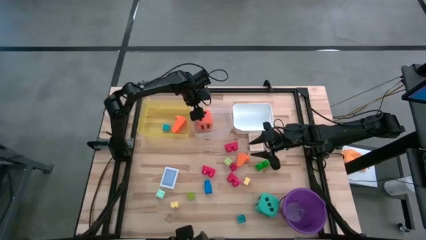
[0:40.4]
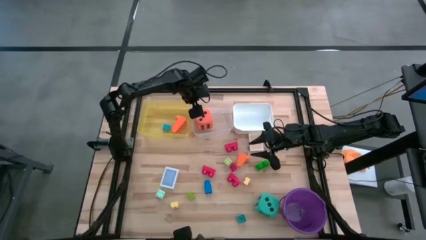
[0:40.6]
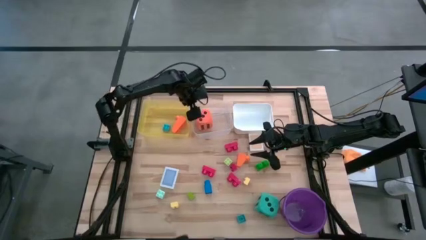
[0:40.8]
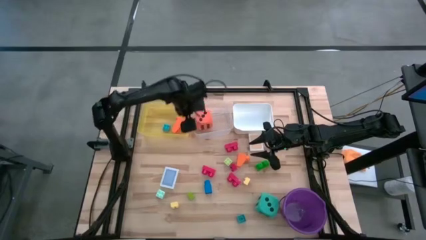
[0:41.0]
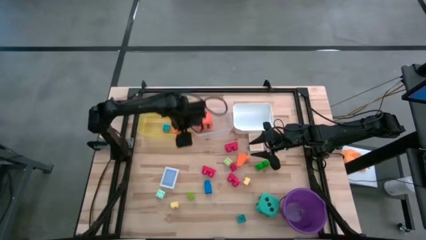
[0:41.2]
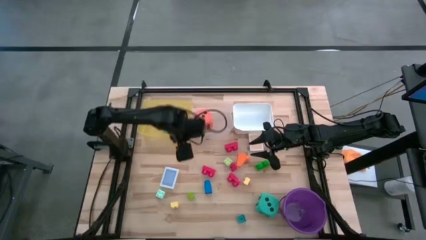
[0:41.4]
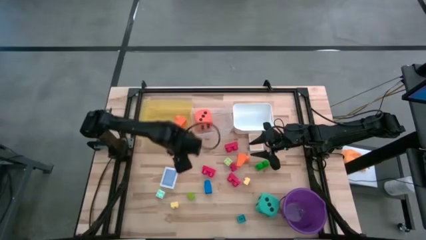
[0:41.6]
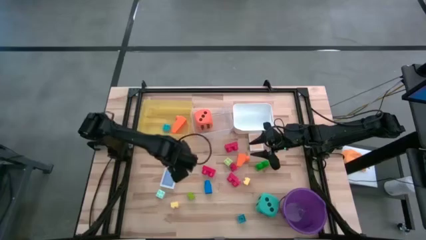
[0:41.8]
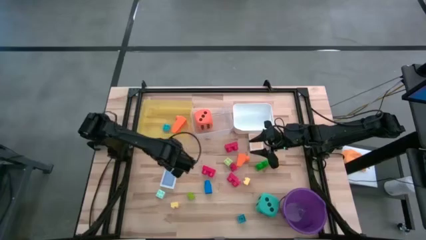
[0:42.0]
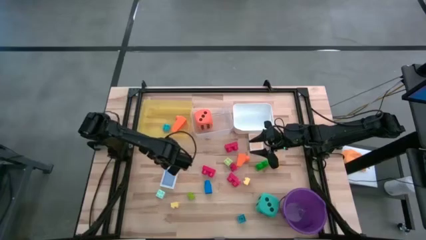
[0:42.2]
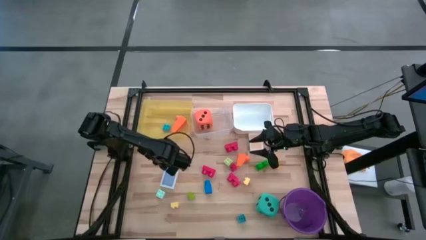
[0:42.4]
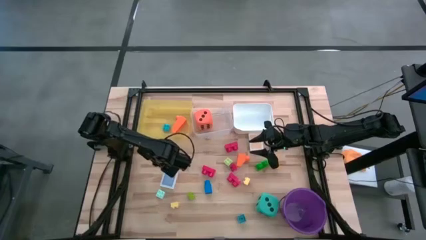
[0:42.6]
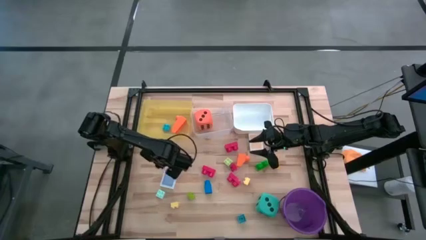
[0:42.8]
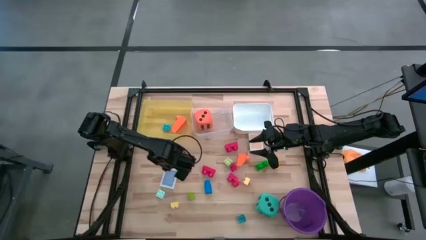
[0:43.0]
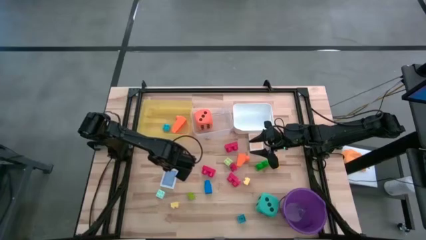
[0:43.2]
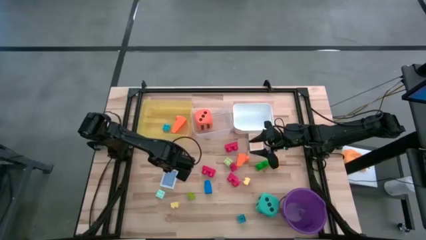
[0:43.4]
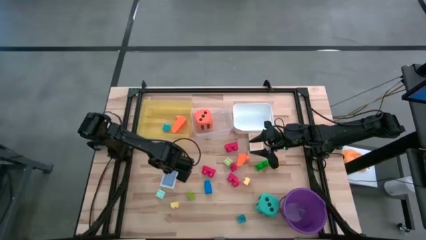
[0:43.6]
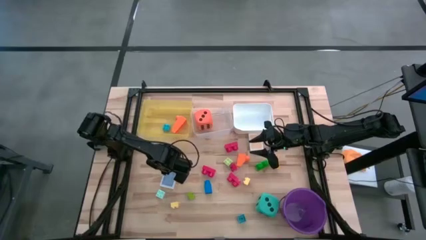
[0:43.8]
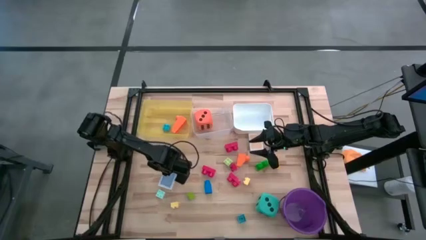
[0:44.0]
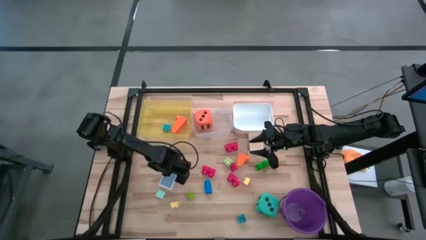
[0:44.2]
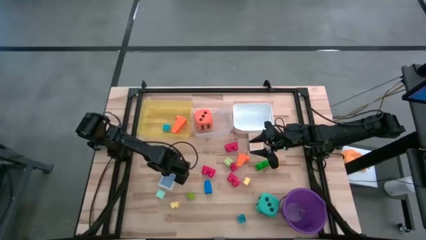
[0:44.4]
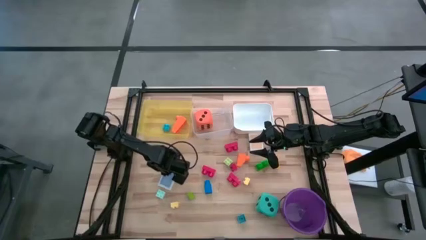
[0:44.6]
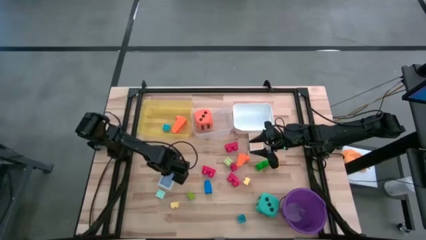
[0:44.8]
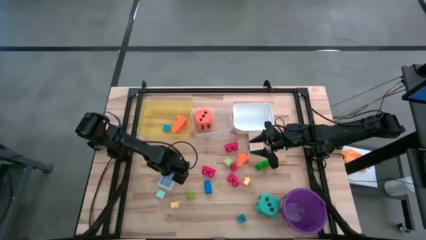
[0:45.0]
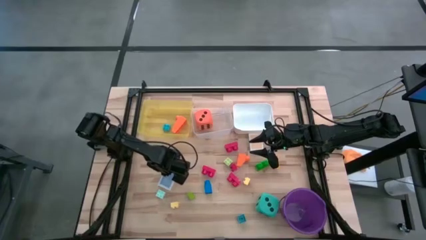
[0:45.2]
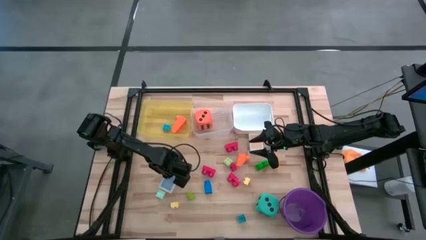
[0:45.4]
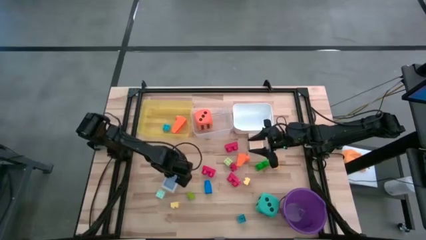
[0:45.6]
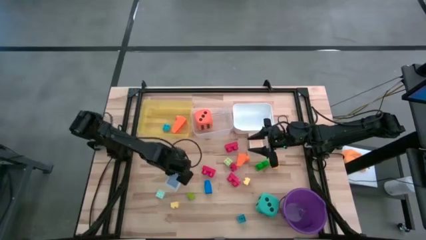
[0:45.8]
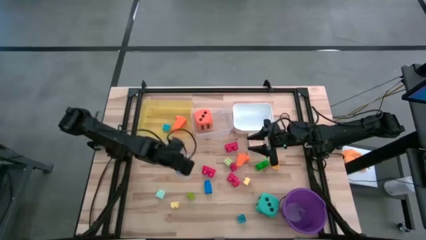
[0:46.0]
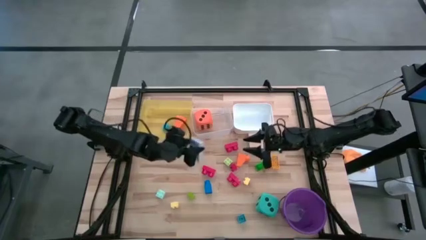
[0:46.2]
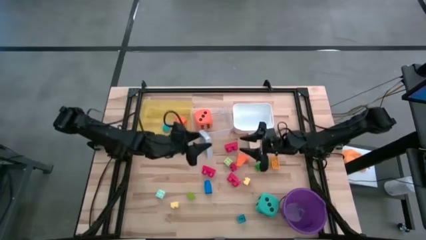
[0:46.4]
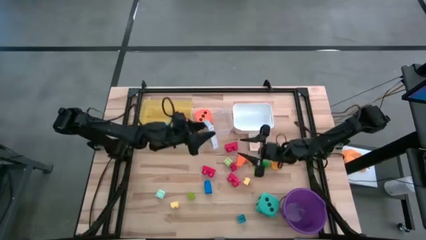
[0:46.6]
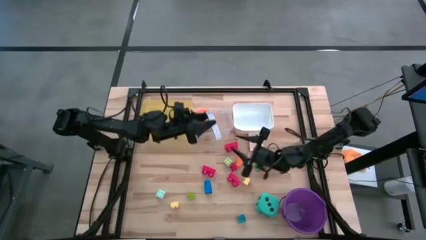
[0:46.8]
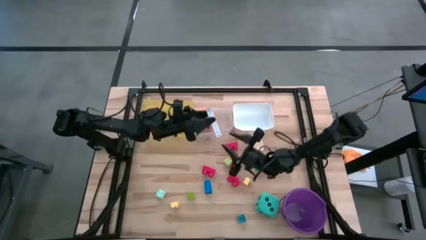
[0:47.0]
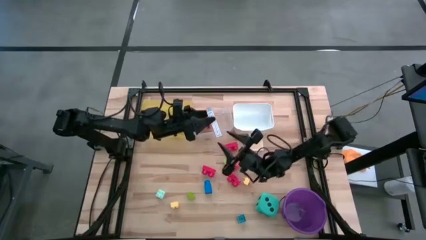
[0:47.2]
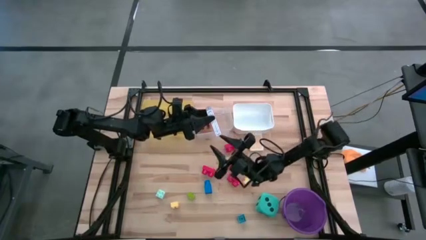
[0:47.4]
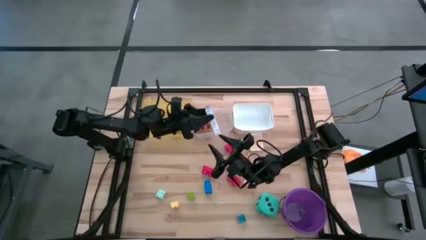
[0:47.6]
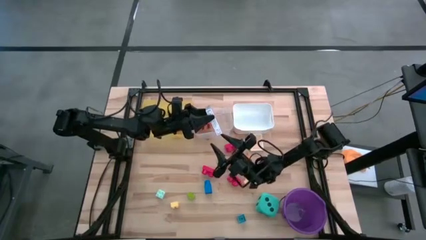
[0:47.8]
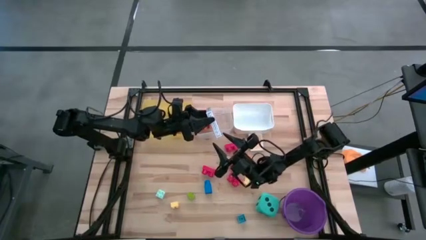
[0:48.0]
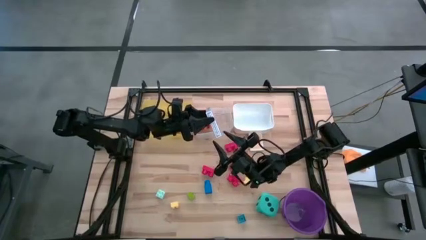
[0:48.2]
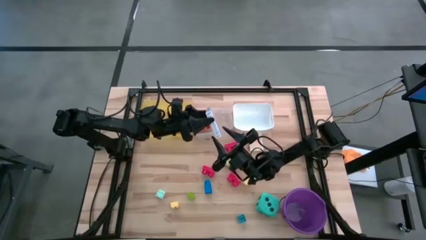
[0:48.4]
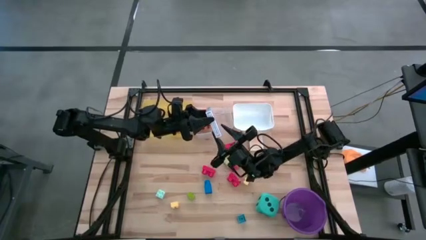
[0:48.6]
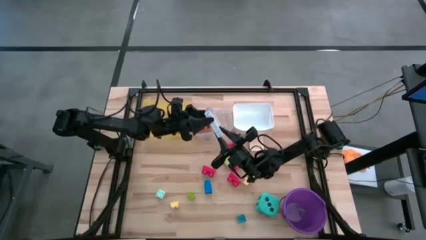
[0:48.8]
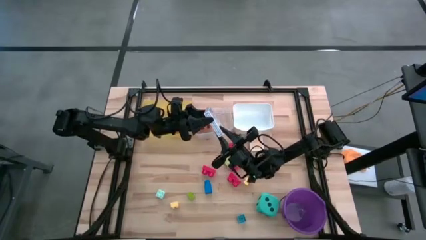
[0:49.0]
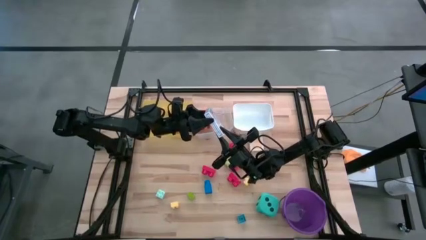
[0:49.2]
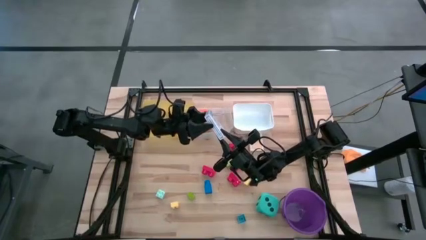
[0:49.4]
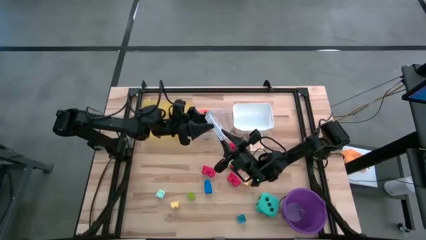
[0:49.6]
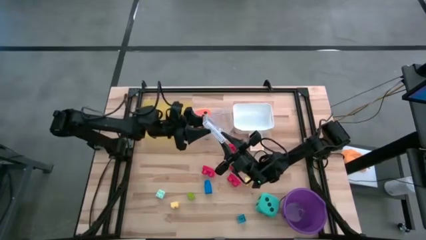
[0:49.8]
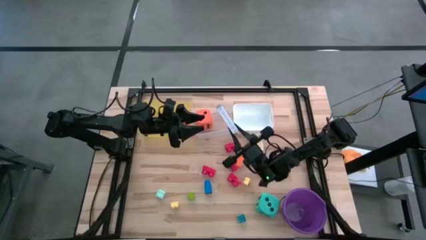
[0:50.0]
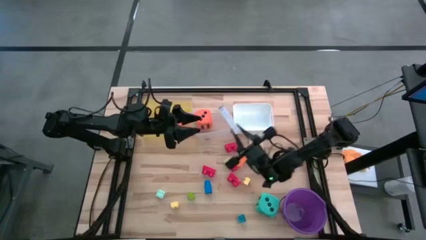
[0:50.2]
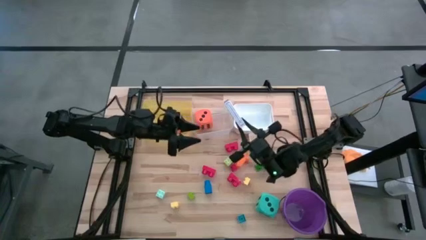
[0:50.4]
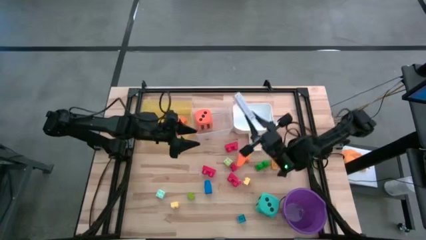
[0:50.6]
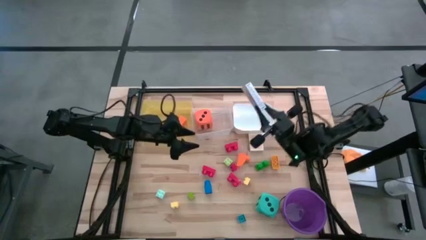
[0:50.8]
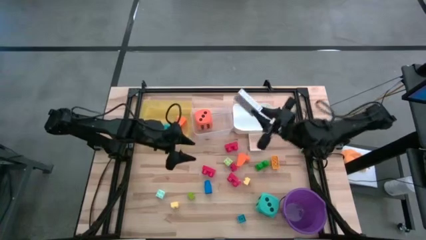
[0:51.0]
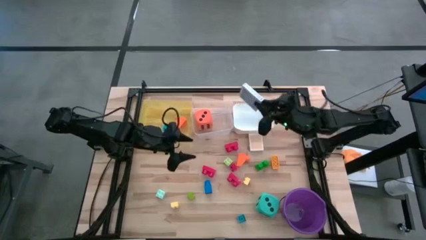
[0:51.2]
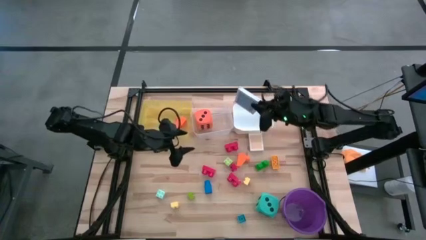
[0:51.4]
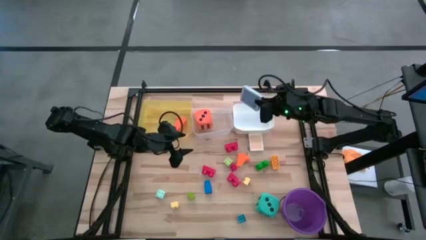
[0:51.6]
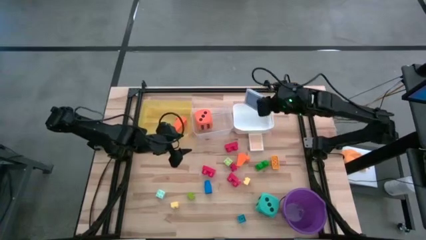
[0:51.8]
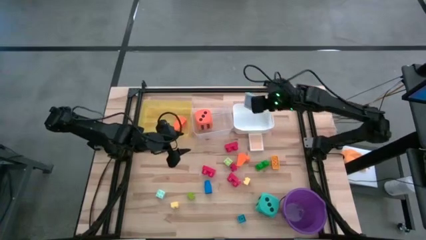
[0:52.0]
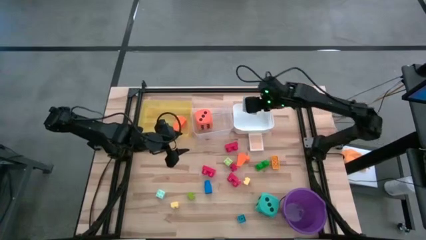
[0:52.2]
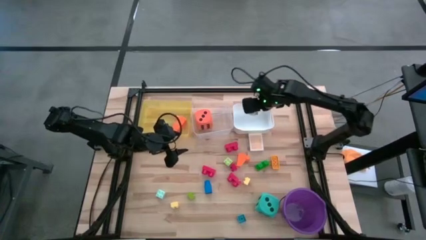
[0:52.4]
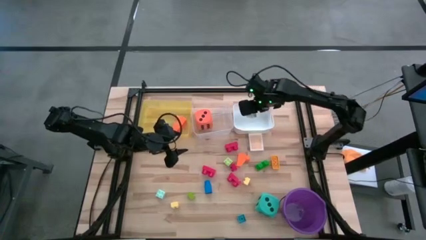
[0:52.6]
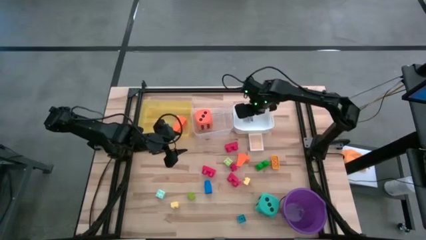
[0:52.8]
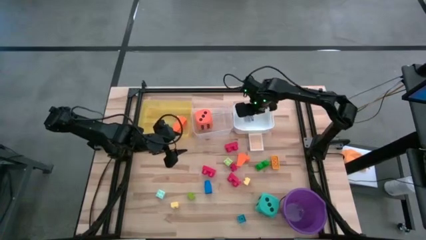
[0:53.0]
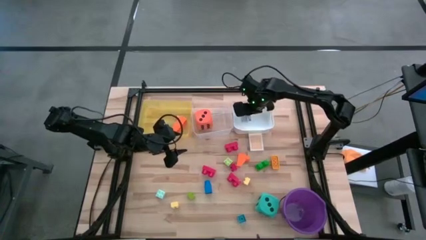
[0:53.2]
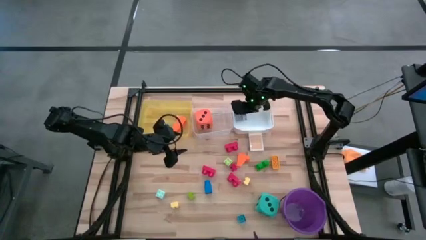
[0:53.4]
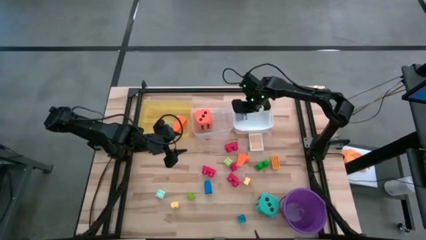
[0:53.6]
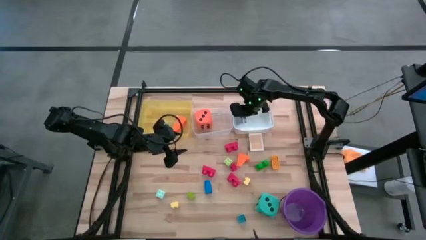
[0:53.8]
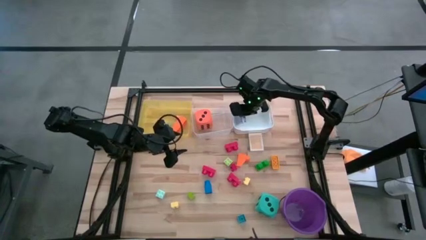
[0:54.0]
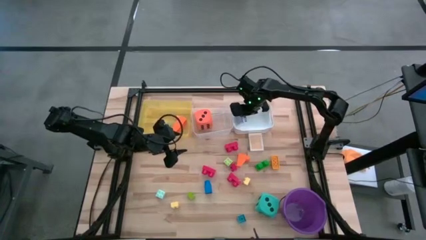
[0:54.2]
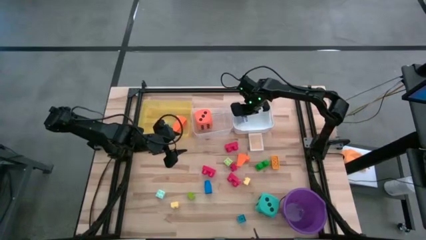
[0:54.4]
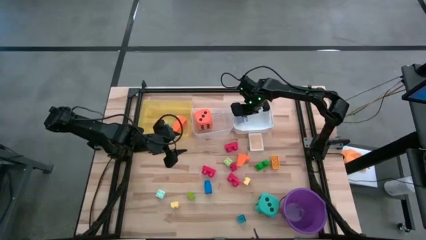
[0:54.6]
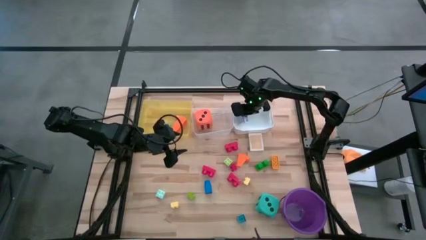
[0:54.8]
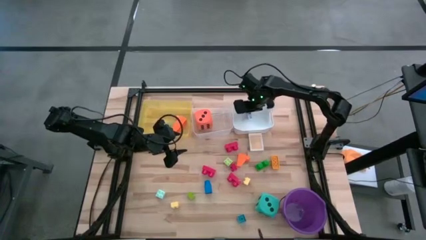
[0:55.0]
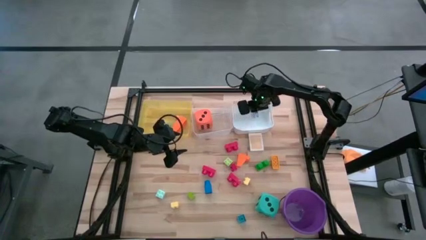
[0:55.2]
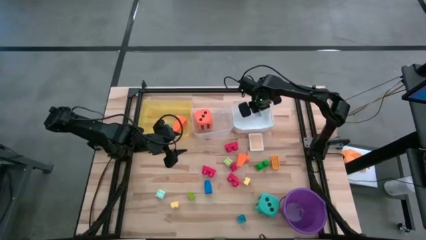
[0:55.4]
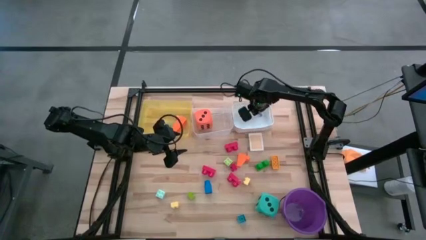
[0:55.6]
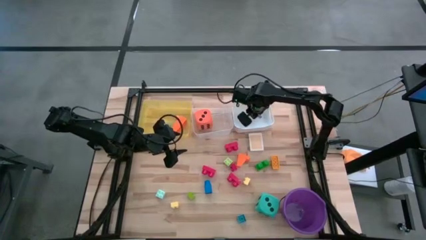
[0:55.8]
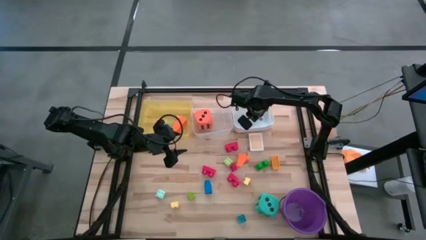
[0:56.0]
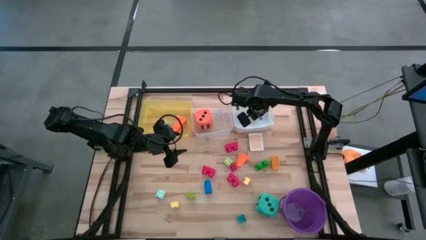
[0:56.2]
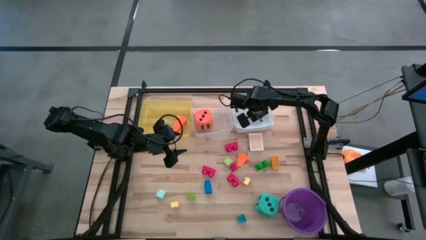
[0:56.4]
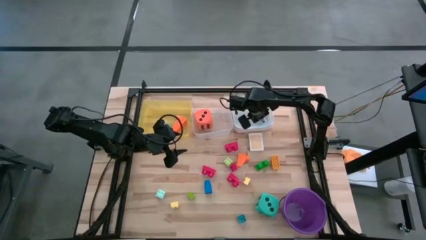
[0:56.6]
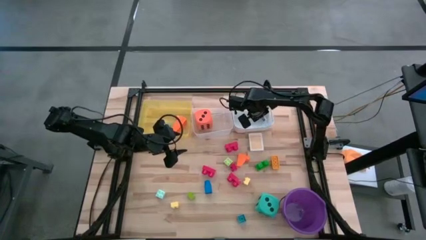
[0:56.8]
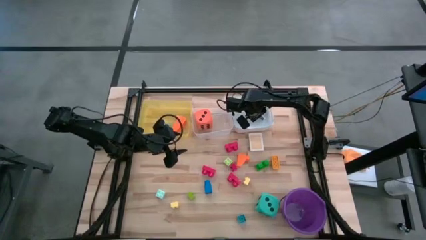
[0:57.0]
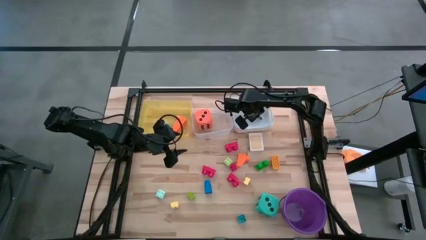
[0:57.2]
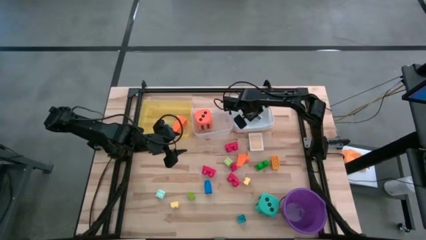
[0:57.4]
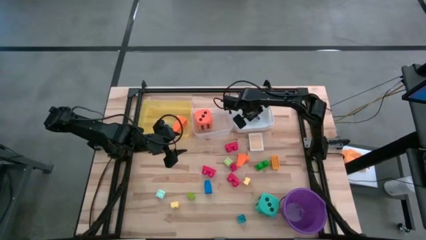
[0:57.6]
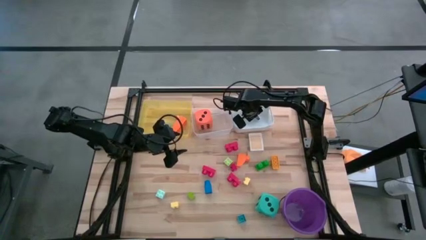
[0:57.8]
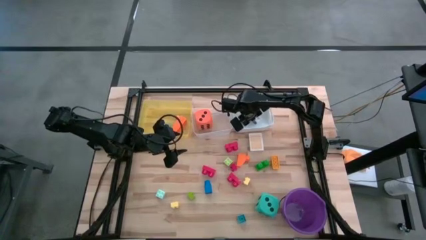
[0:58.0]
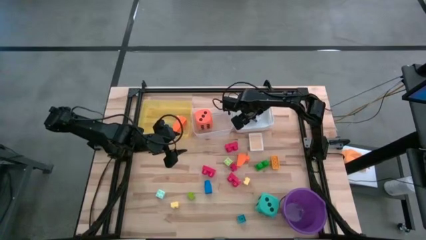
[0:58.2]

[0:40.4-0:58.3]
Task: Pick & Place Toys
Put the blue deck of cards into the white bin
